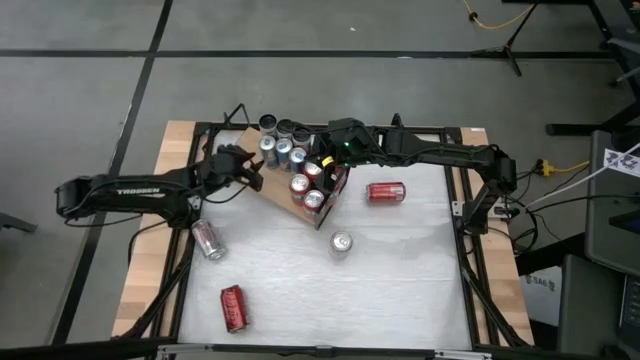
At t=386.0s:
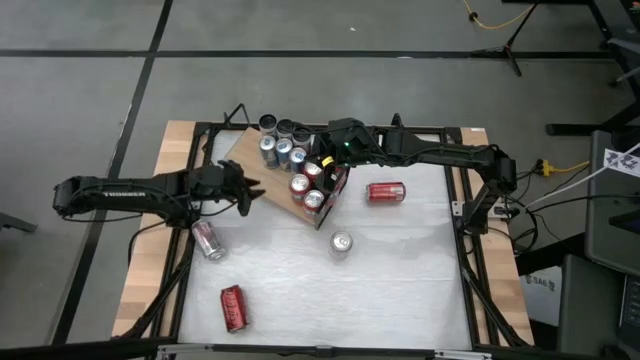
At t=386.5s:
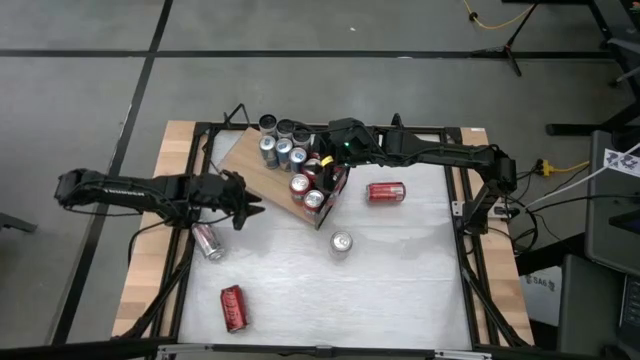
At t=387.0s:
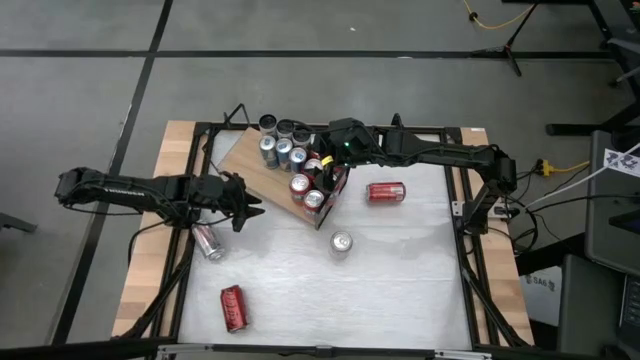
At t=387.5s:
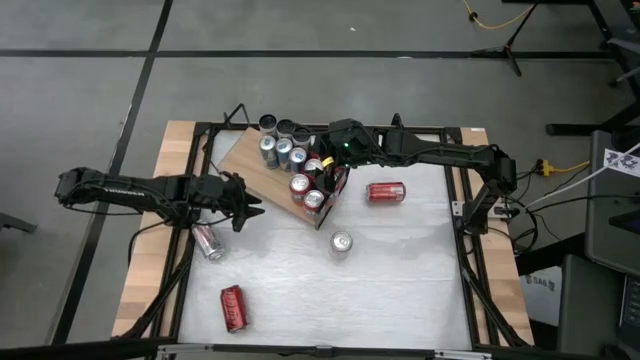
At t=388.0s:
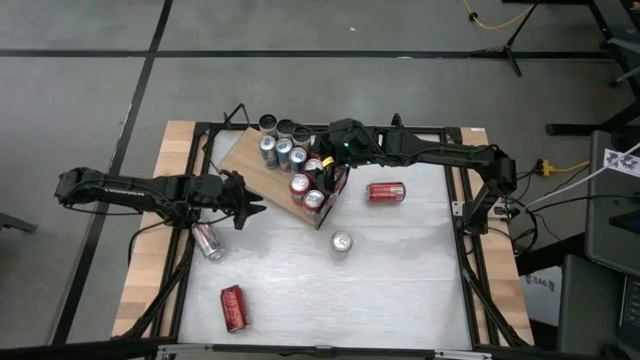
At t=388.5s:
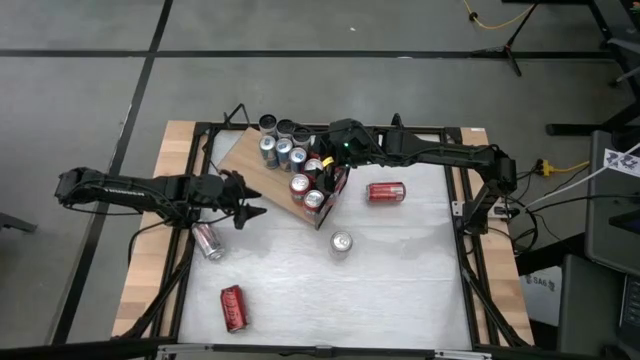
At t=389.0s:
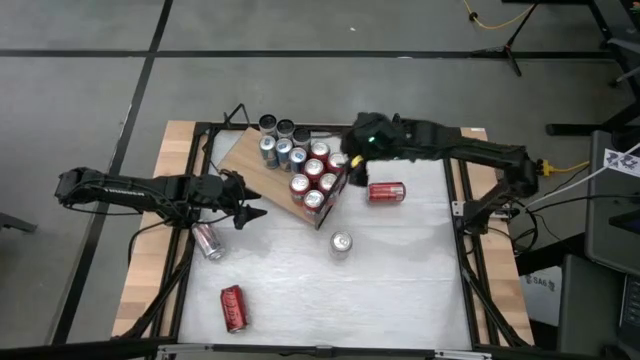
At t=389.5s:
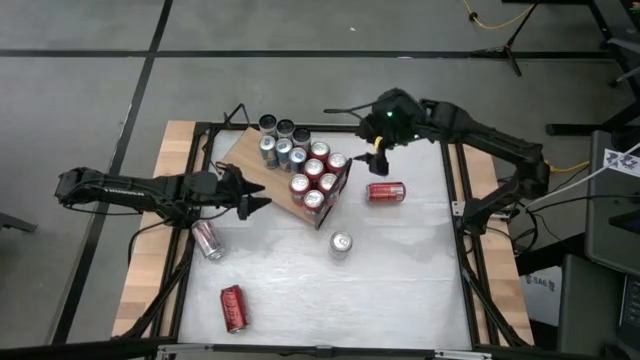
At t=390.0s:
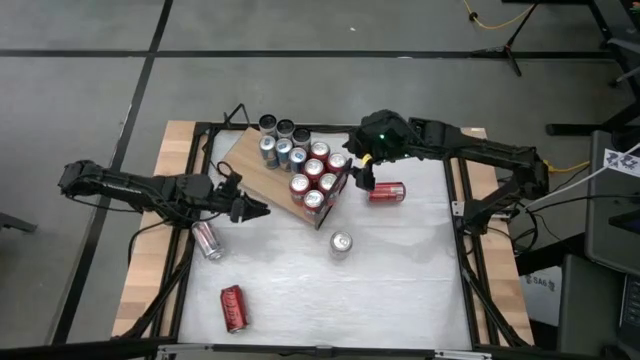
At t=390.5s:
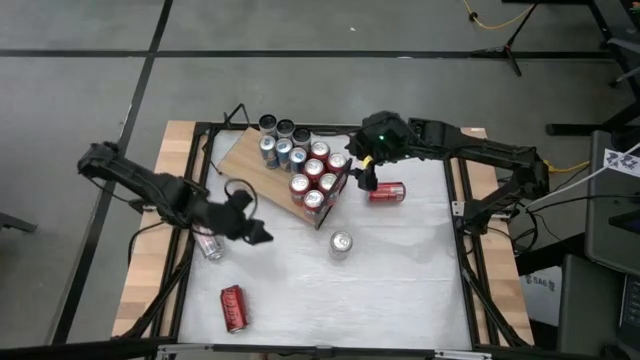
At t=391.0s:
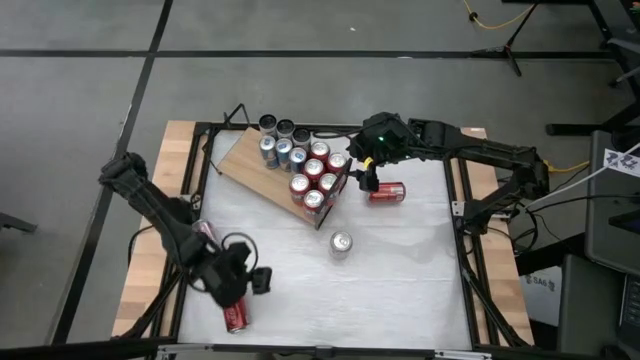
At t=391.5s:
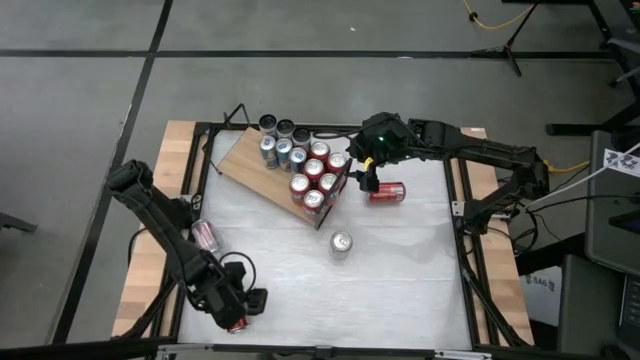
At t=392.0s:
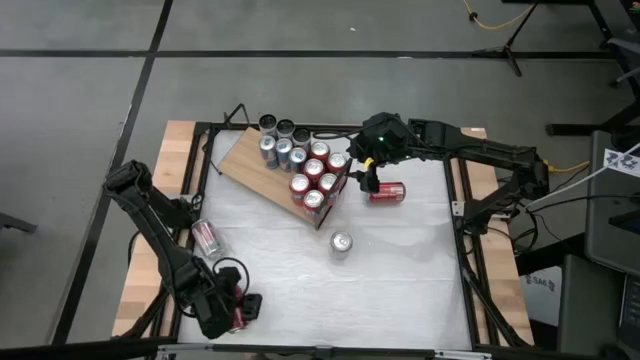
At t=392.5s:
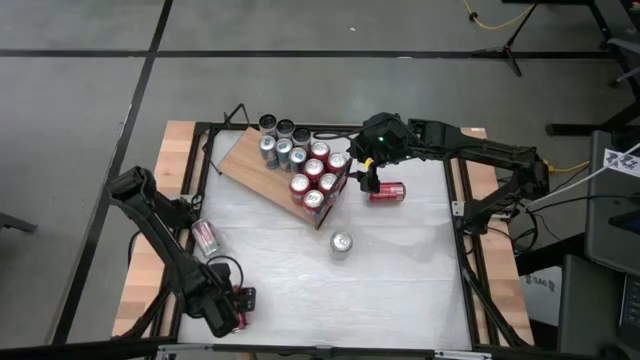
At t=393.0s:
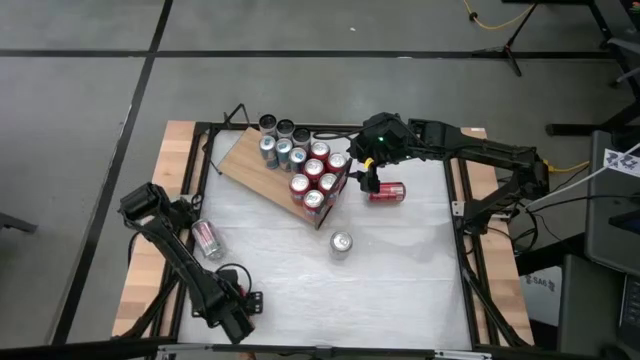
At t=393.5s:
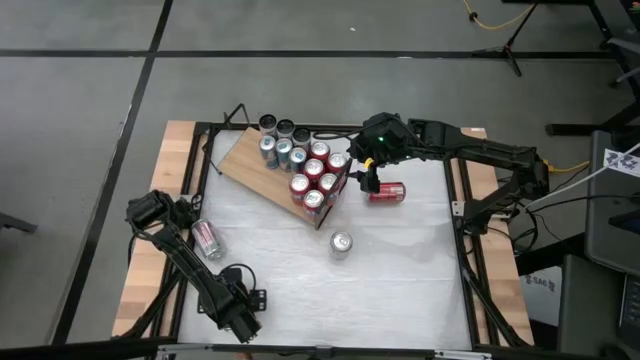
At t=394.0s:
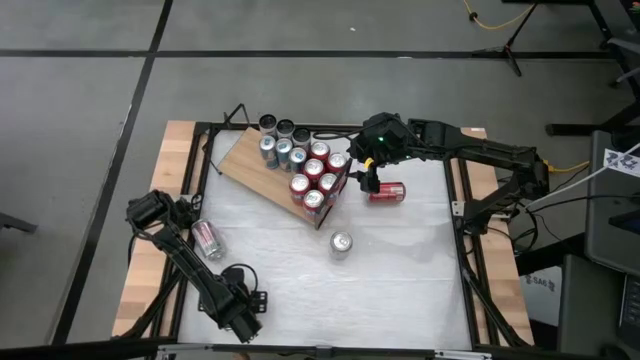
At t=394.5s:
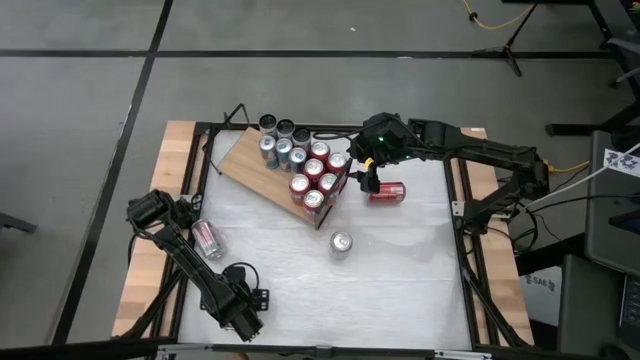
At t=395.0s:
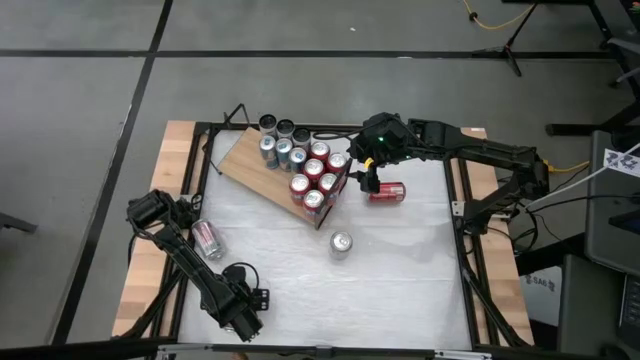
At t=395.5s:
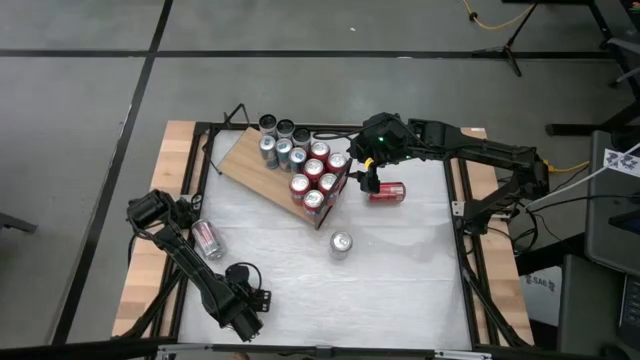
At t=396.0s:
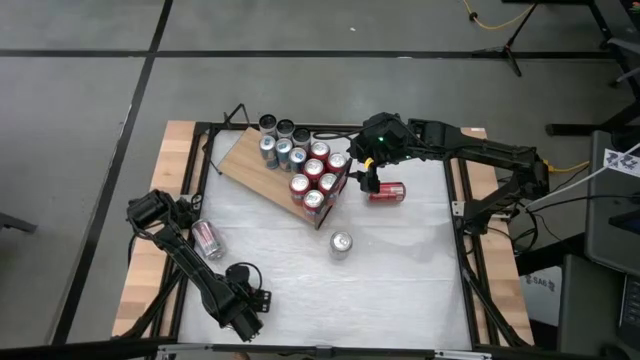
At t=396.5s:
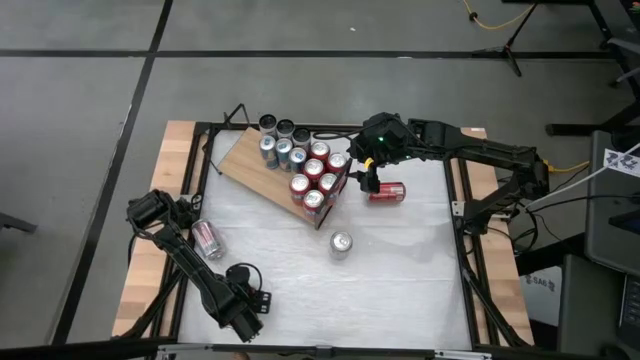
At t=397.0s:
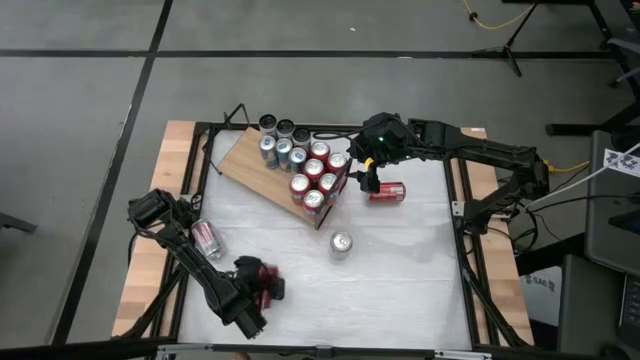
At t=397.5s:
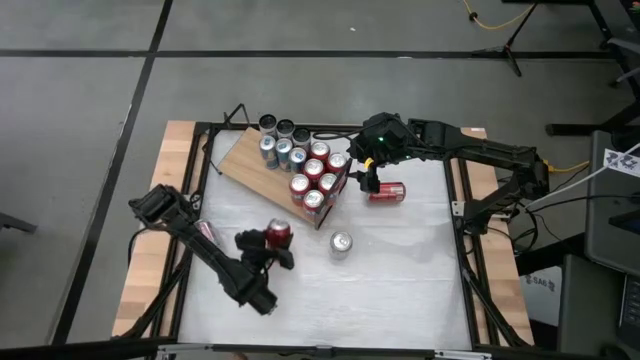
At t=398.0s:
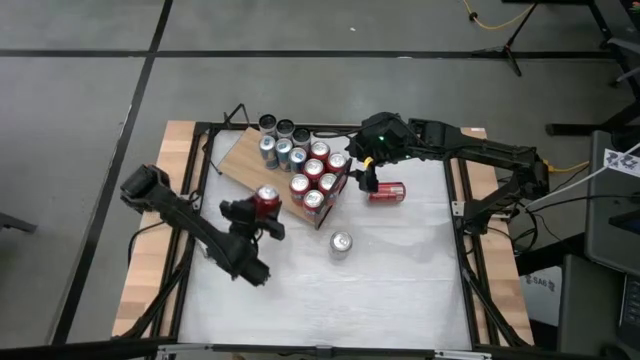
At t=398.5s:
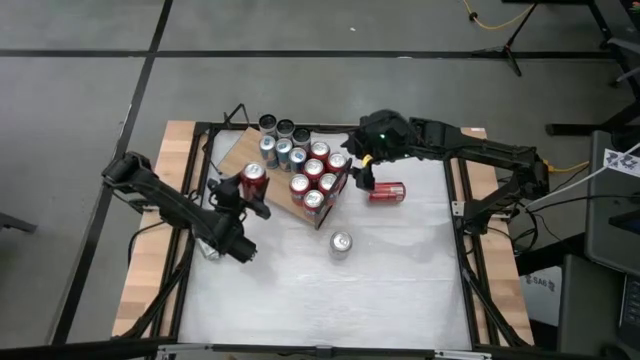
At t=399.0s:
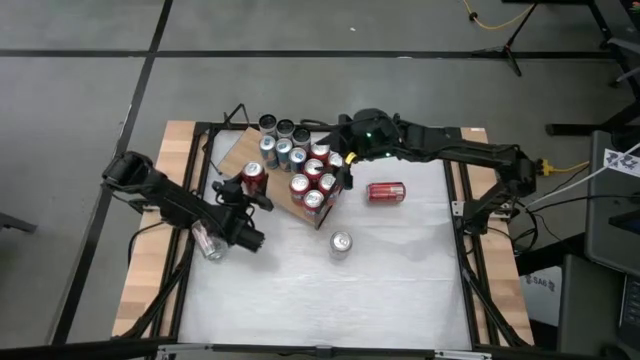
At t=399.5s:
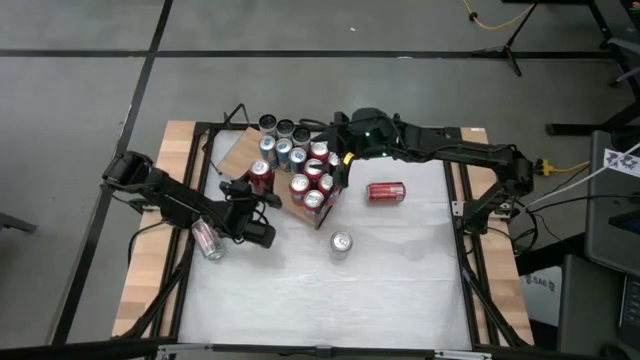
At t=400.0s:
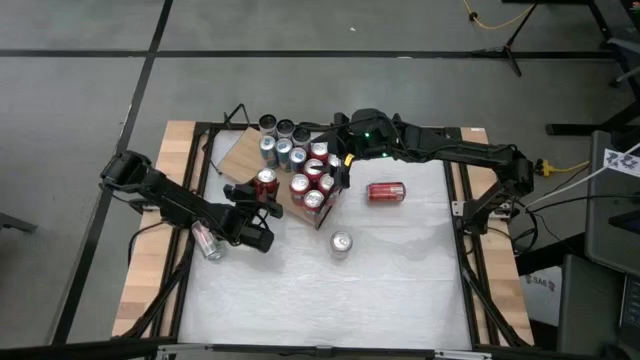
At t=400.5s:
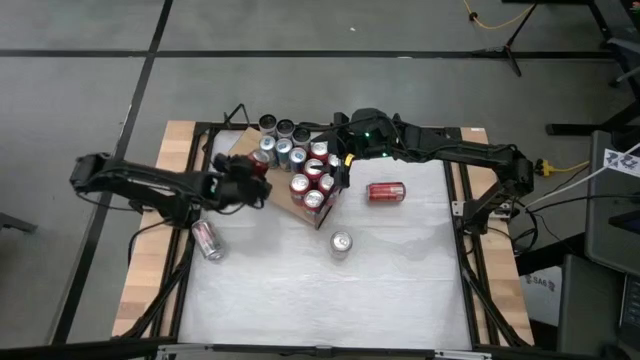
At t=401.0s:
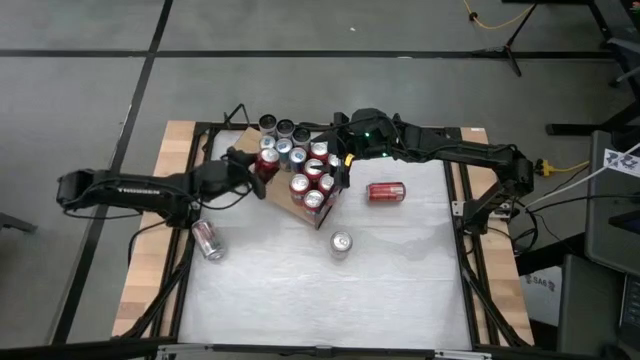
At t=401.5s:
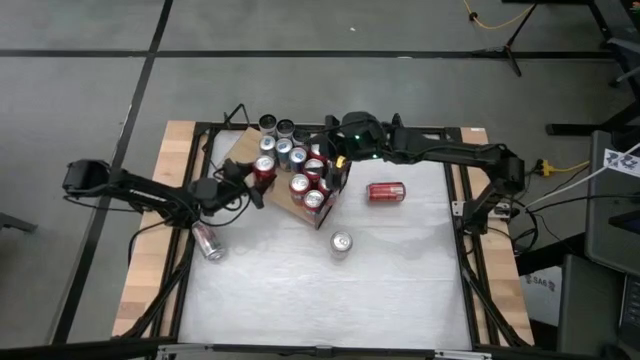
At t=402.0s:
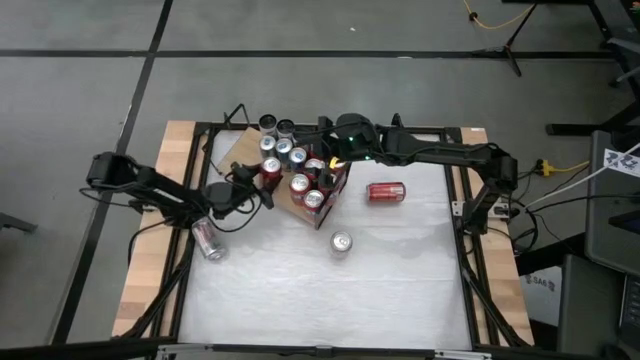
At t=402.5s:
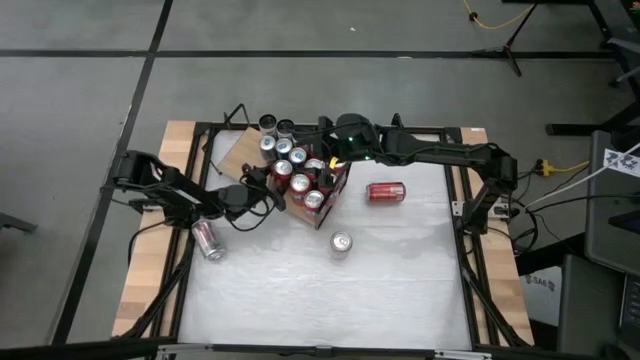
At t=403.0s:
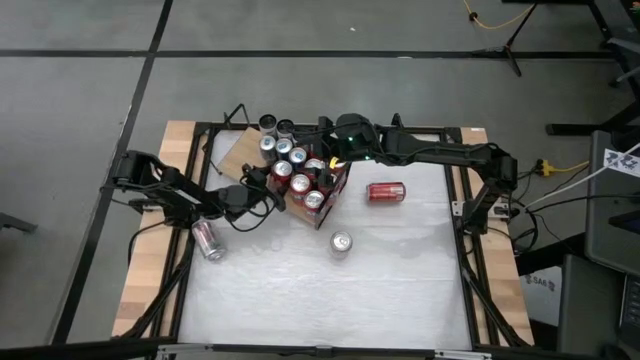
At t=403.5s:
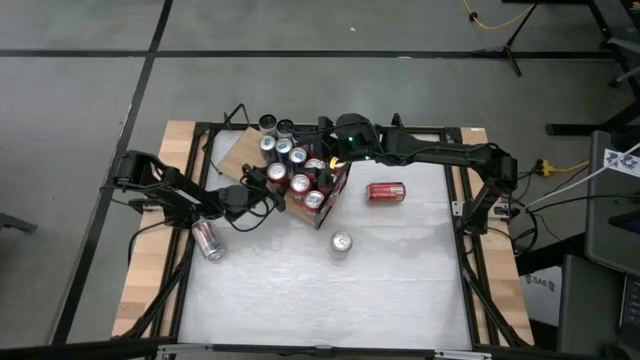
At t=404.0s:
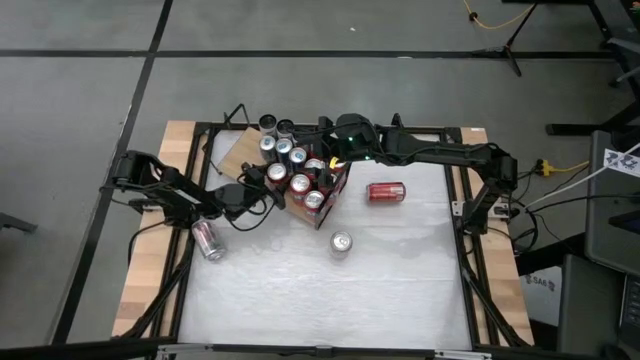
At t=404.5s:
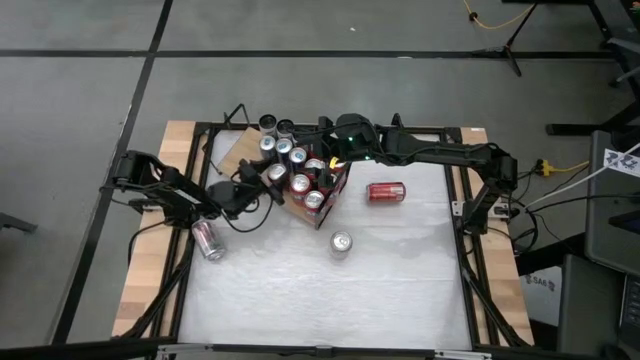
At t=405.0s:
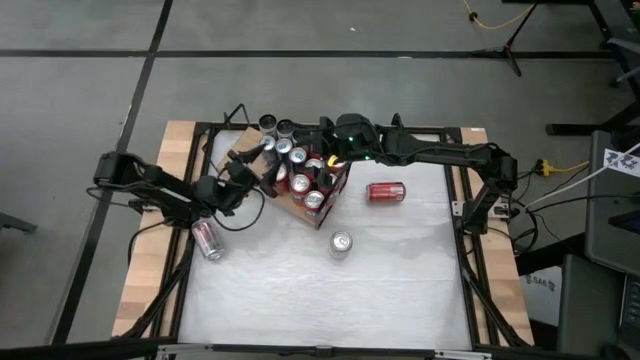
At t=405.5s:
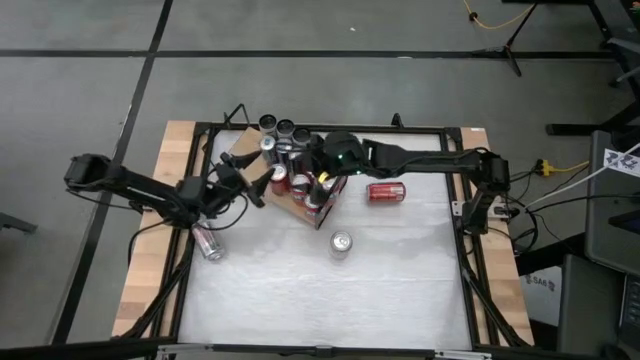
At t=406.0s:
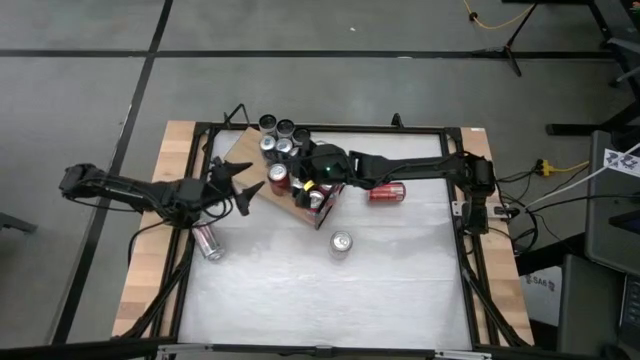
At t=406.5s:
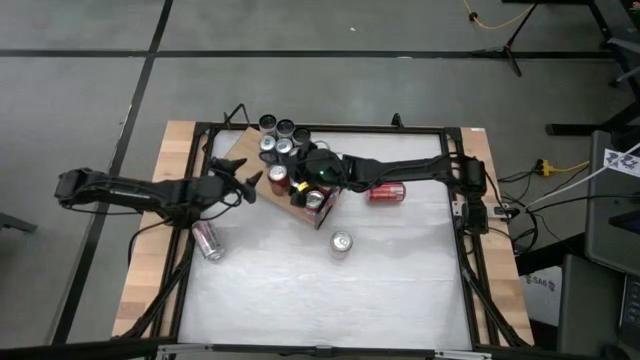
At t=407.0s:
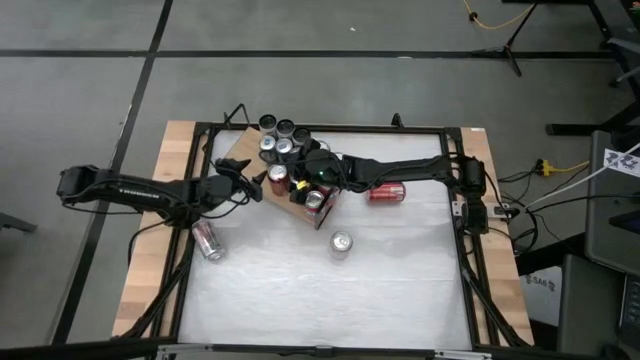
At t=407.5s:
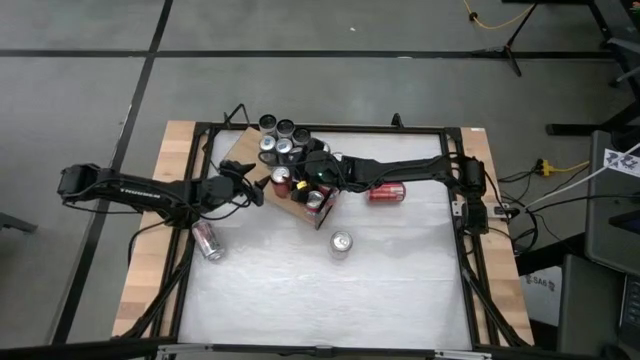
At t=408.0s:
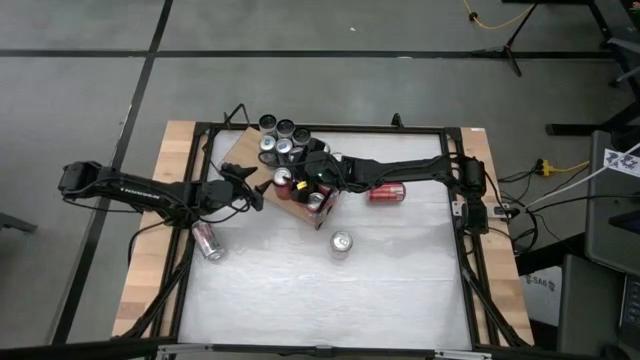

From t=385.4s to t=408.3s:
Task: Pick and place cans onto a shelf
Put the bottom red/black soda can on the shelf
